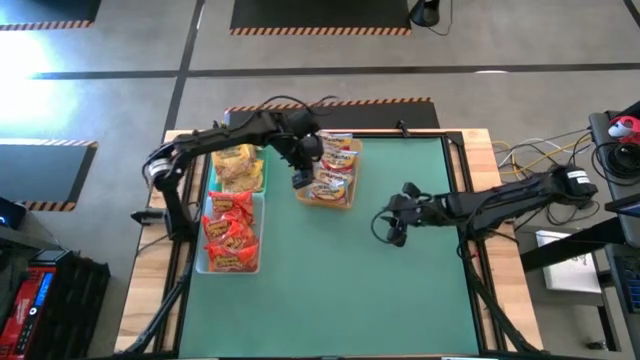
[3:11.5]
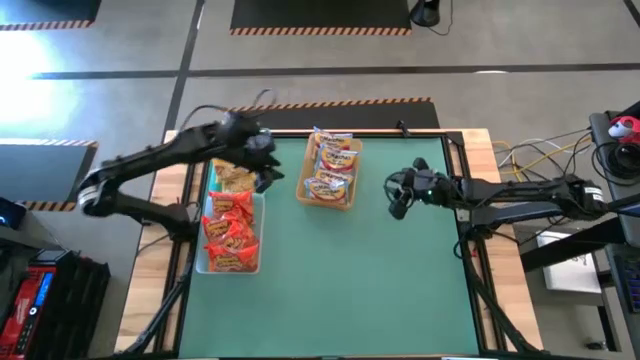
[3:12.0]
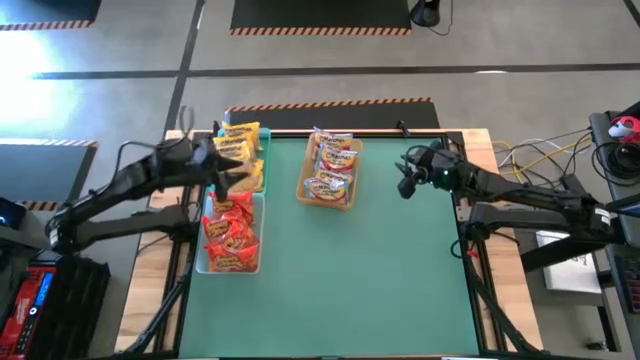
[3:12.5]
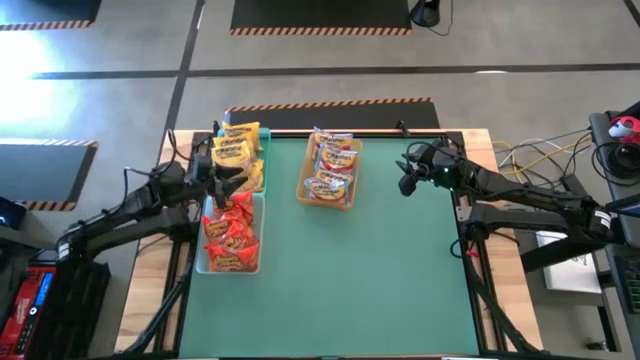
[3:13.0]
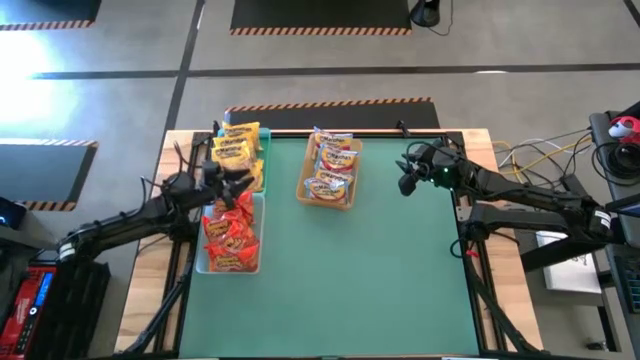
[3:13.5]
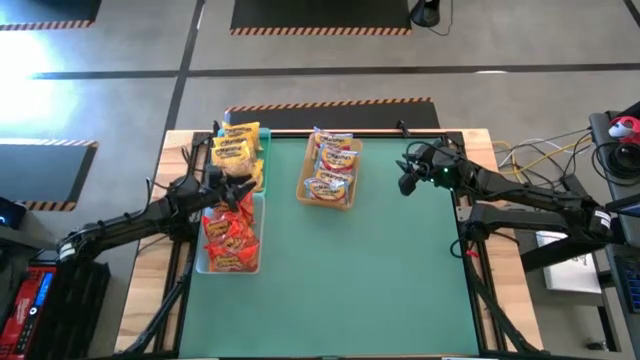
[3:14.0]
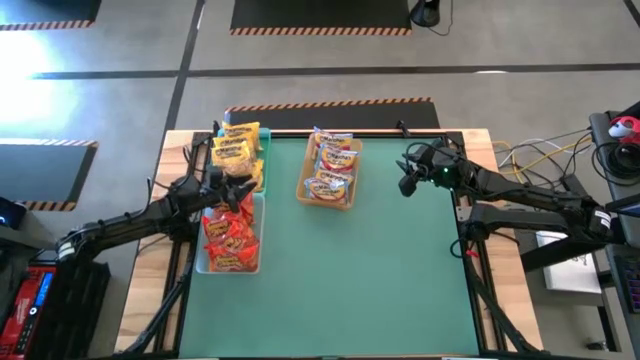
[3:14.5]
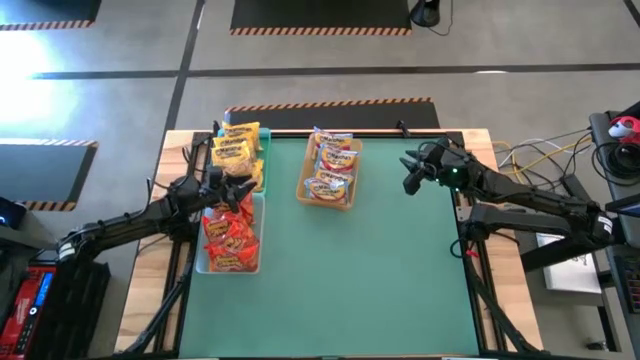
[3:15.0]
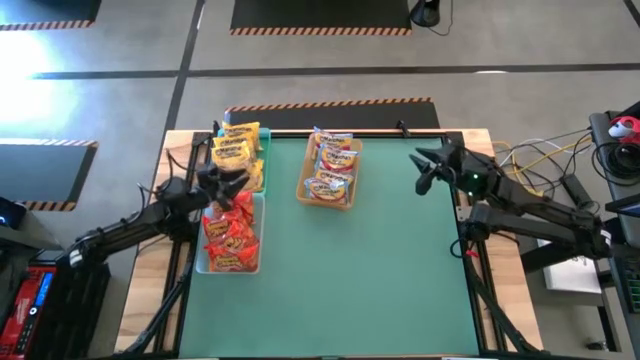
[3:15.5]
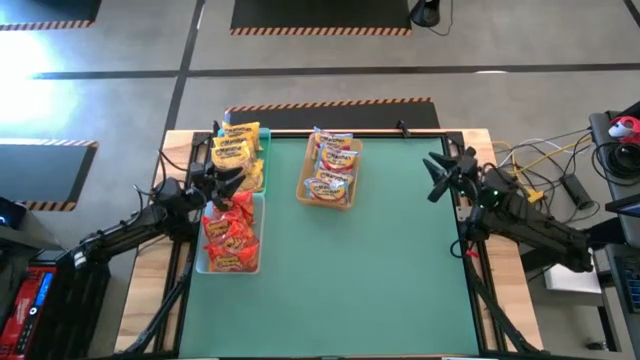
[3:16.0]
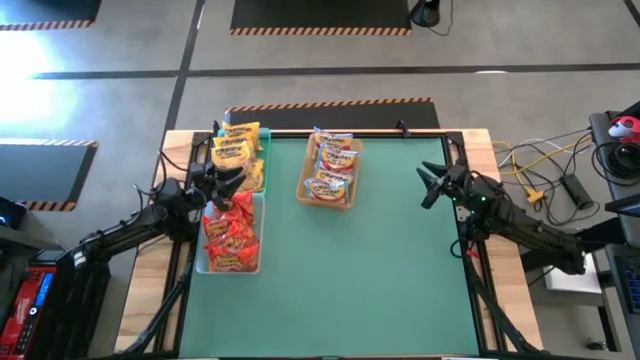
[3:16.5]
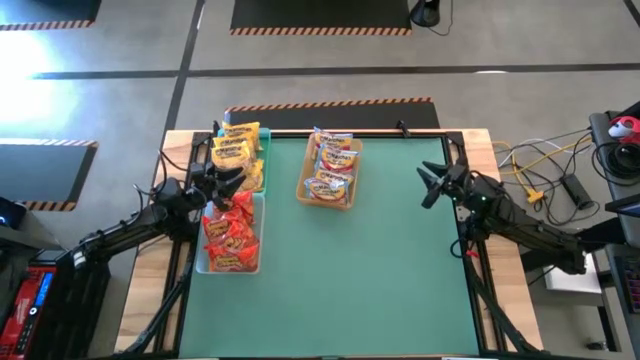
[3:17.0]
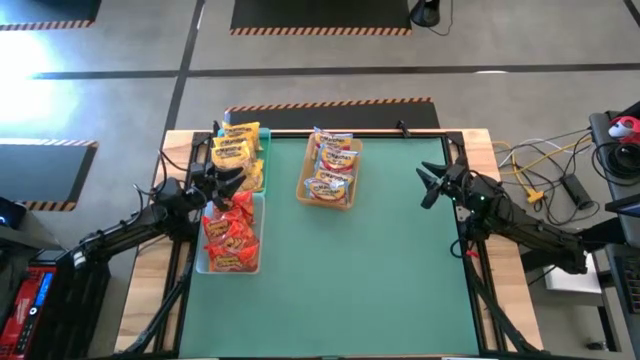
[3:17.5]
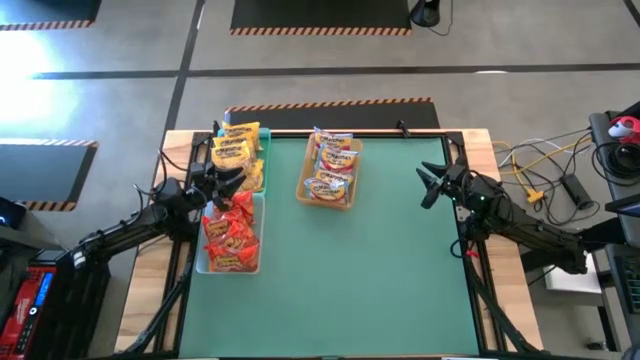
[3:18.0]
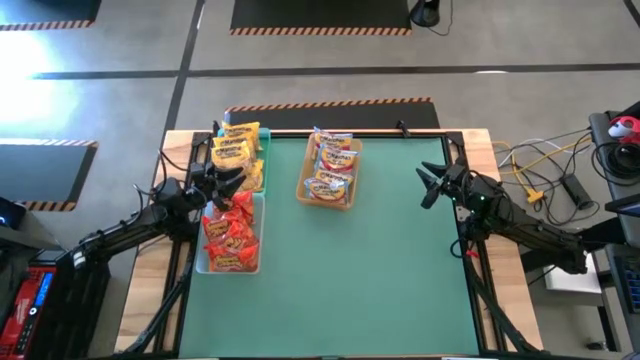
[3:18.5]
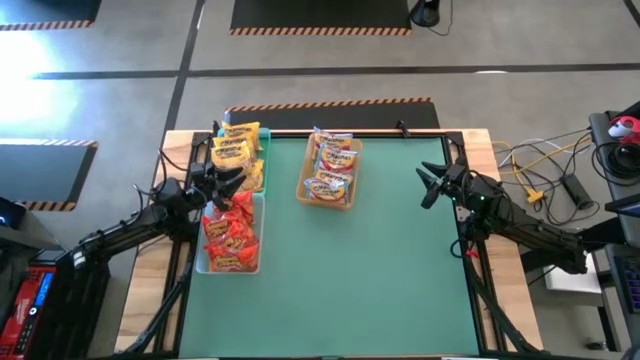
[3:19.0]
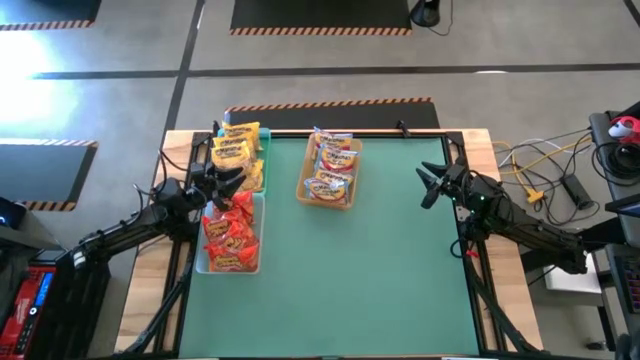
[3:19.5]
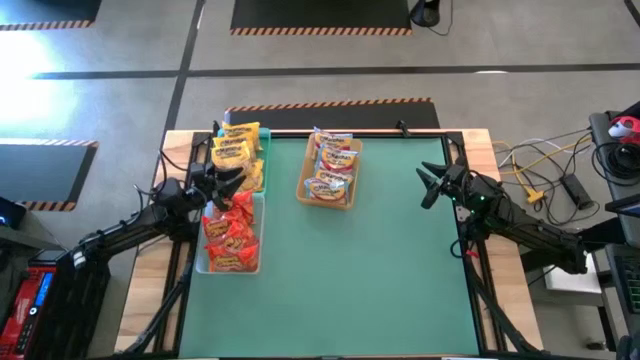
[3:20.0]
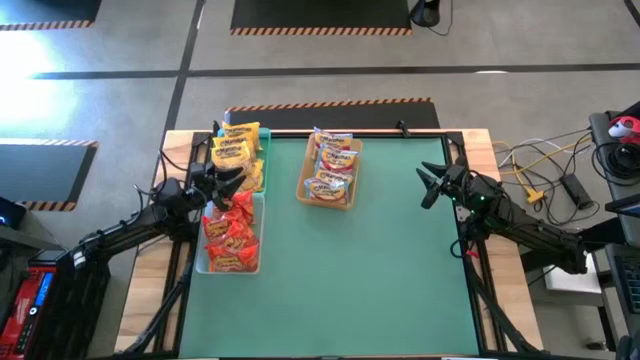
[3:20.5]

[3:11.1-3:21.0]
Task: Sort Maruchan noodles
Return to Home Position

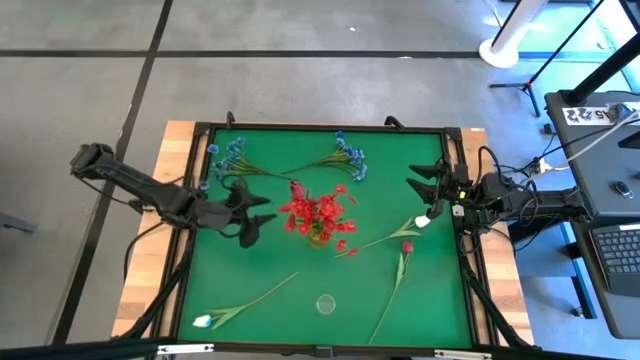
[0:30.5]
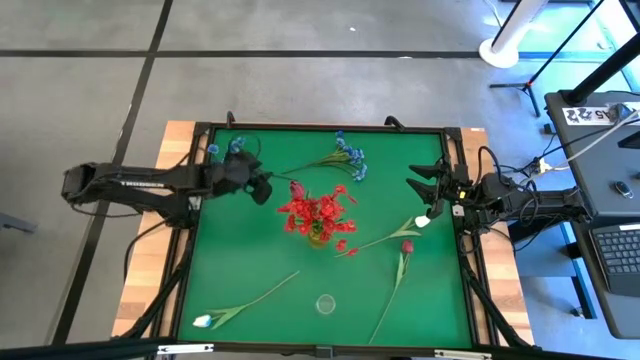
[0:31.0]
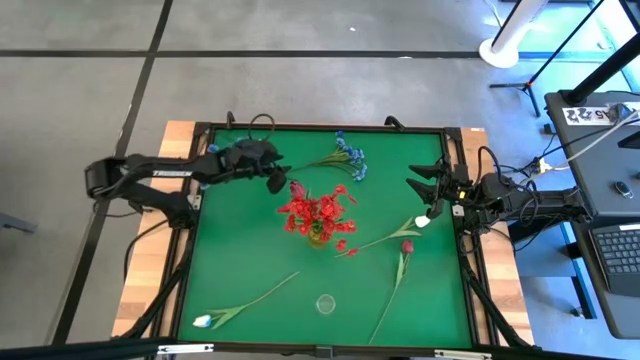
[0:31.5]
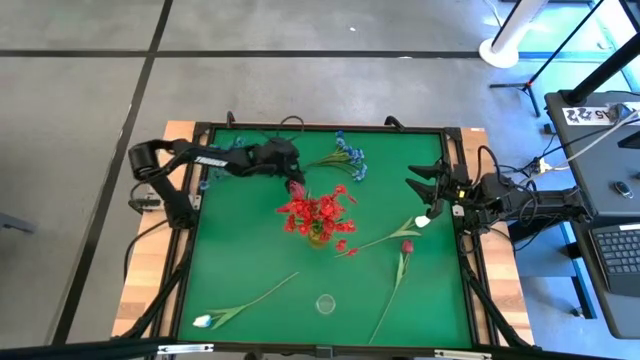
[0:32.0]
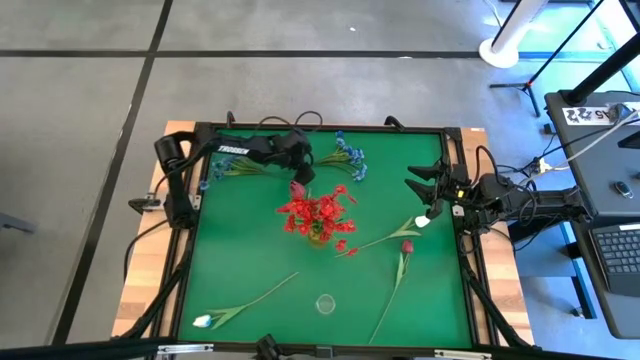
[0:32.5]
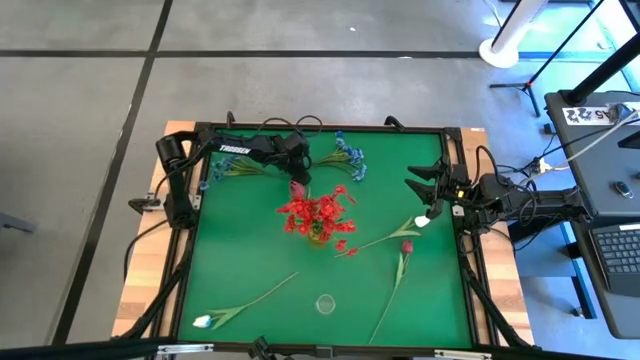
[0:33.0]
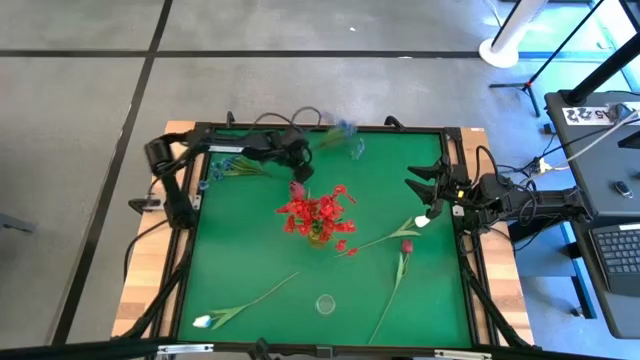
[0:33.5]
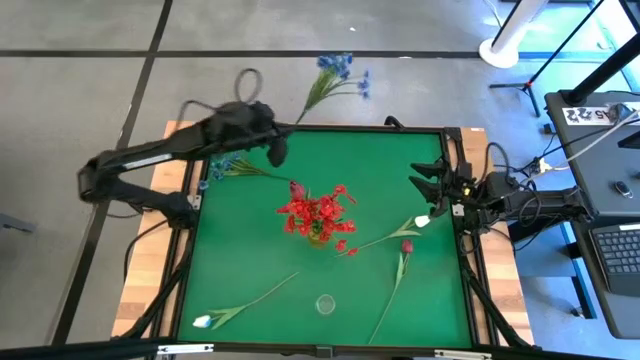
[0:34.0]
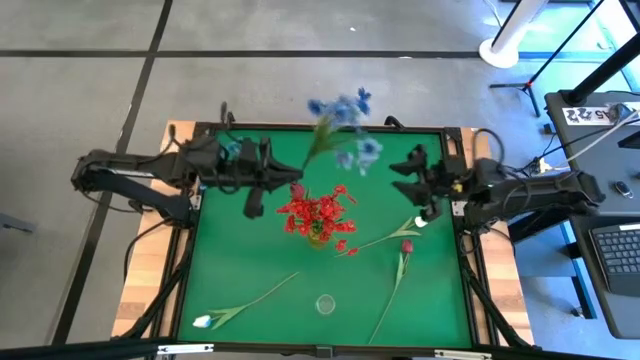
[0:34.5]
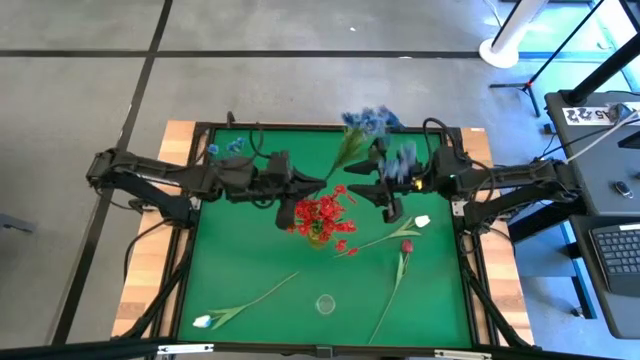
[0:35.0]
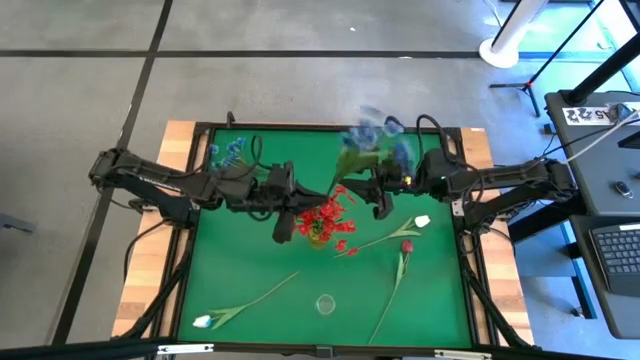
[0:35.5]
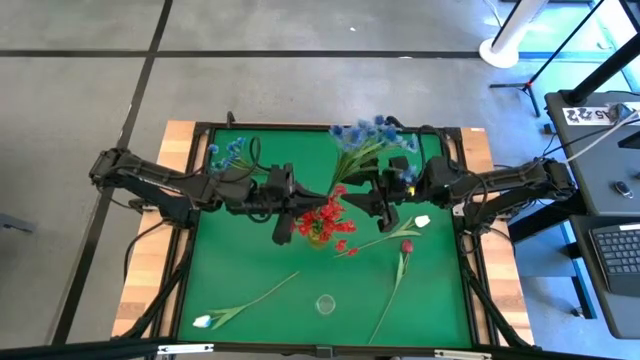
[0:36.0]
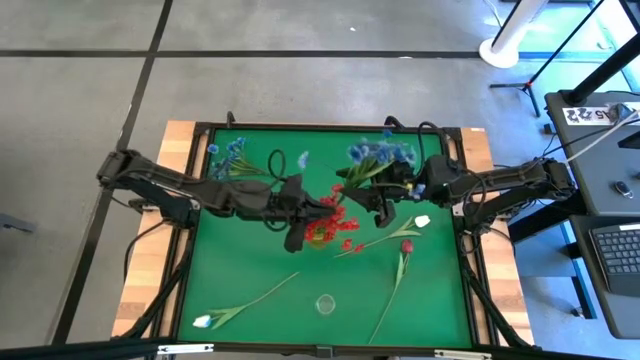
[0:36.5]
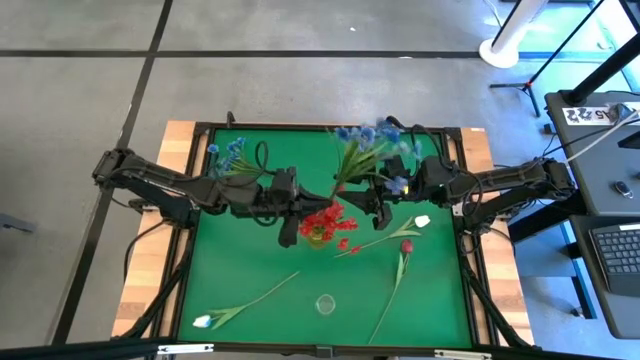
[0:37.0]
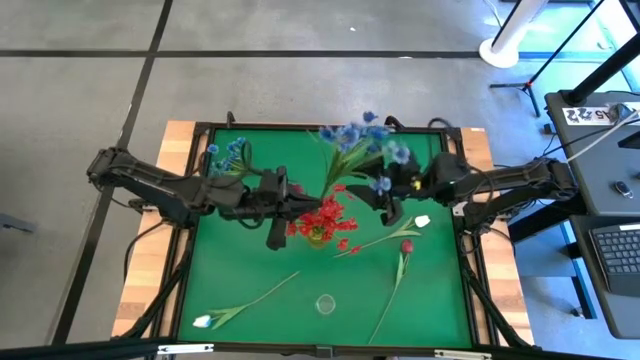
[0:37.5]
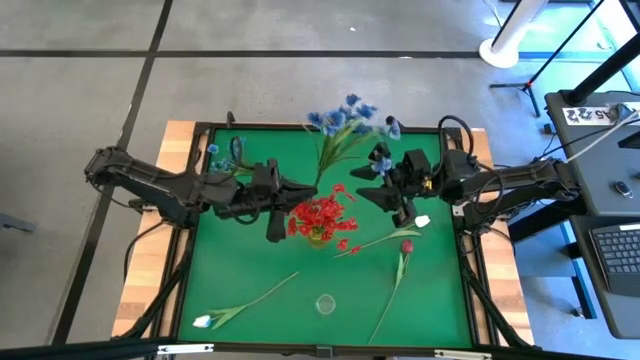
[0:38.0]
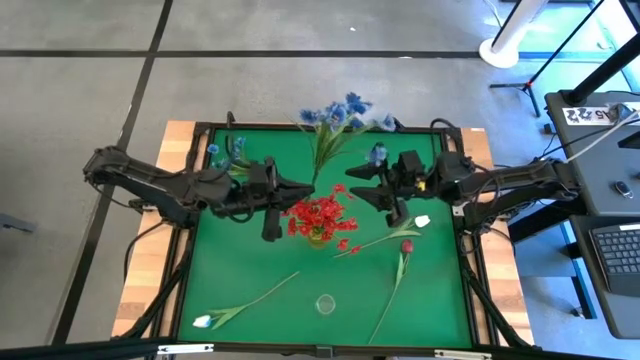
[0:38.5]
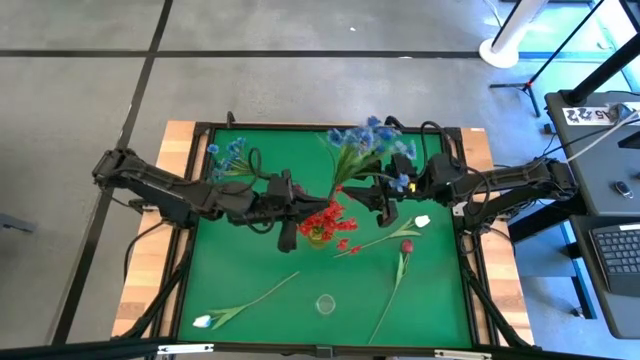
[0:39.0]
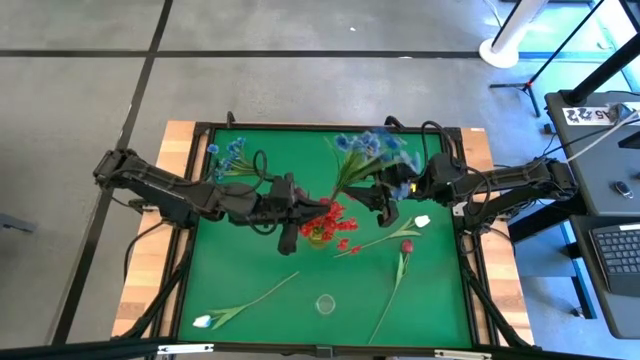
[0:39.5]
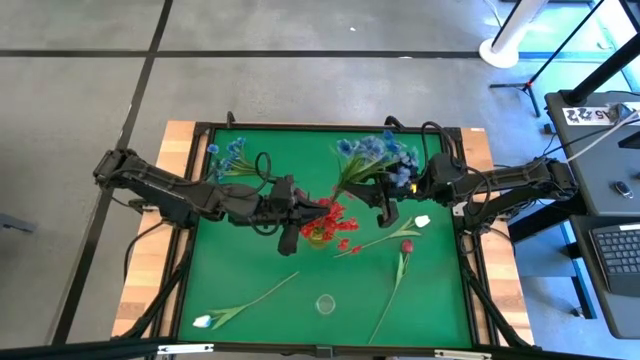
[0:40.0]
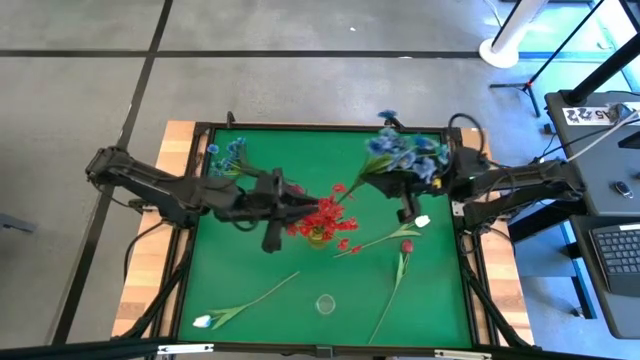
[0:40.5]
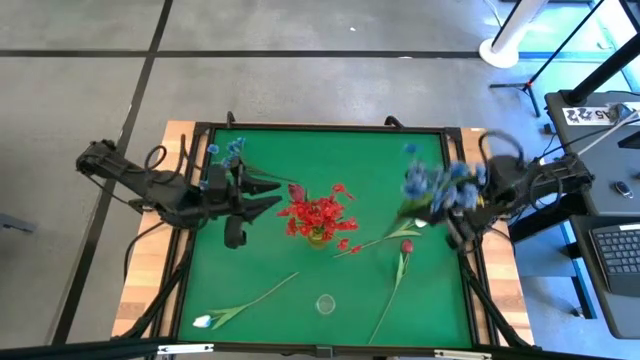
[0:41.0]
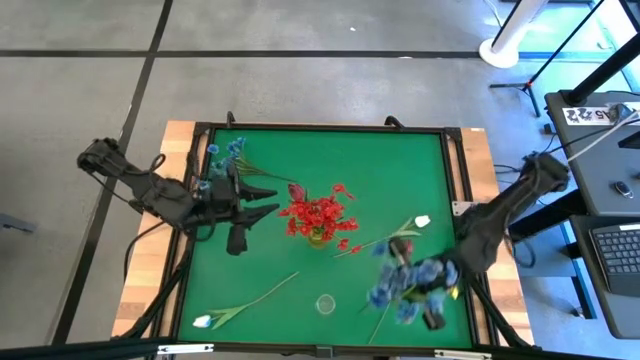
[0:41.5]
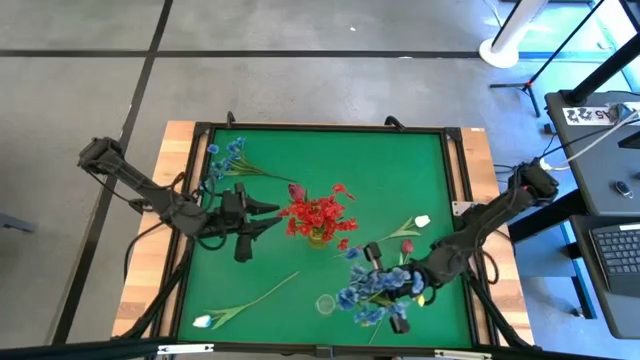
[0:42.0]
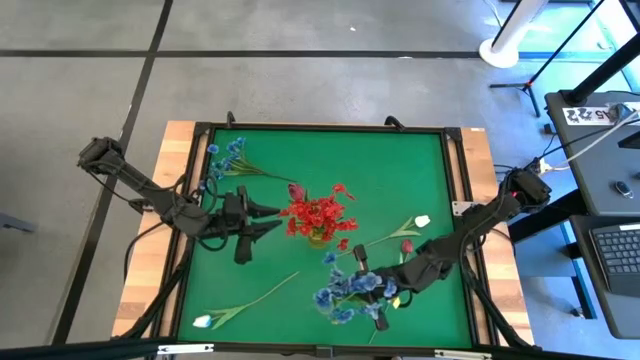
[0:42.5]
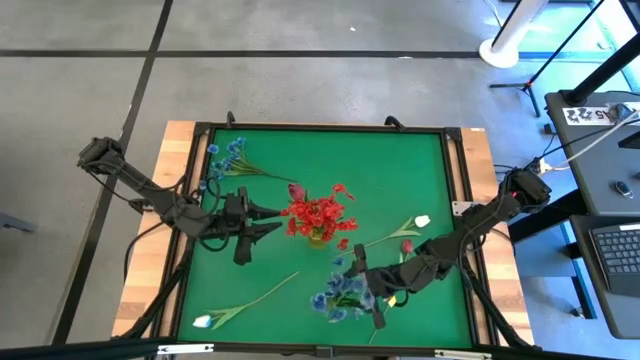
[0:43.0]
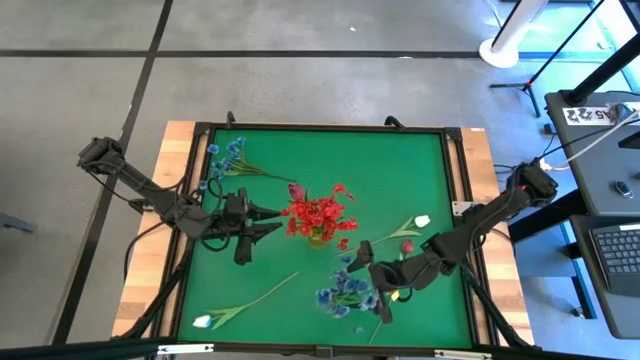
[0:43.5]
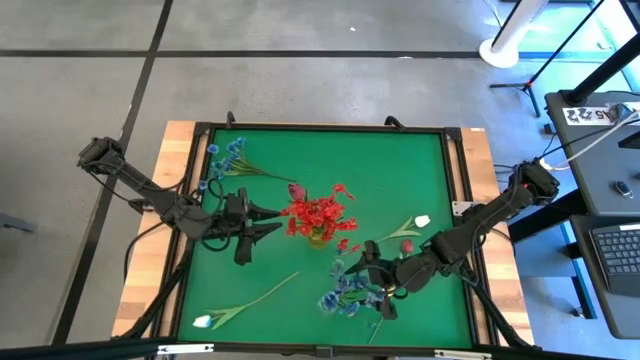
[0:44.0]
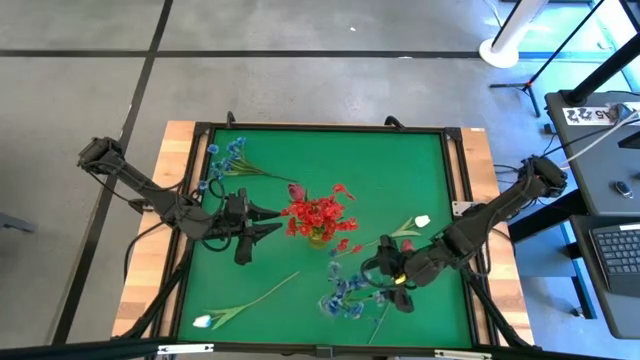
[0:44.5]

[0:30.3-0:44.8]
Task: Sort flowers into vase by color
Put the right blue flowers into the transparent vase
